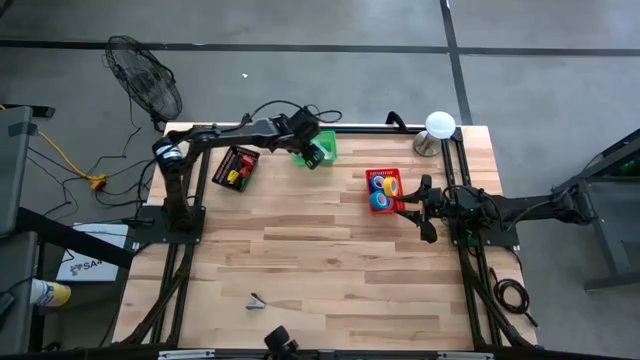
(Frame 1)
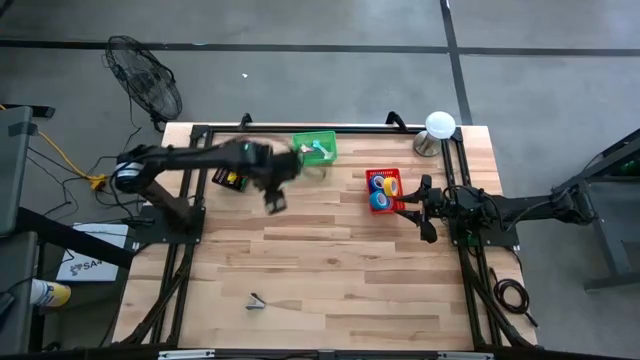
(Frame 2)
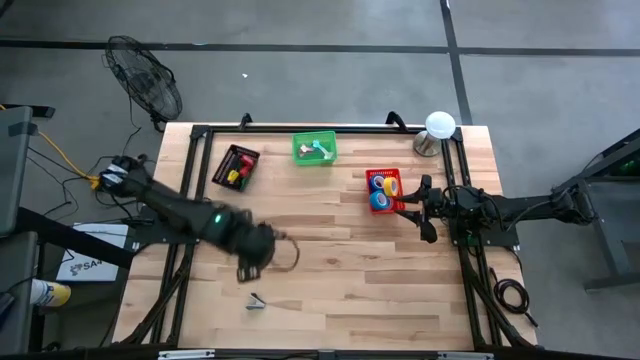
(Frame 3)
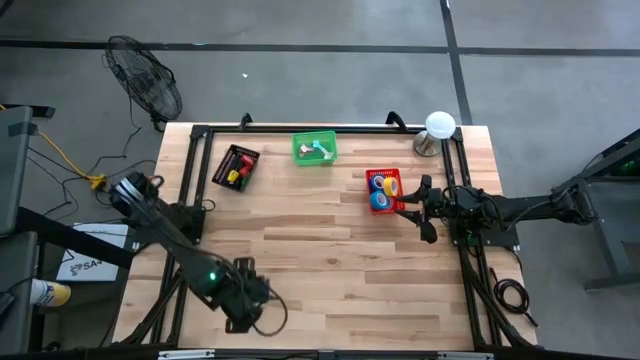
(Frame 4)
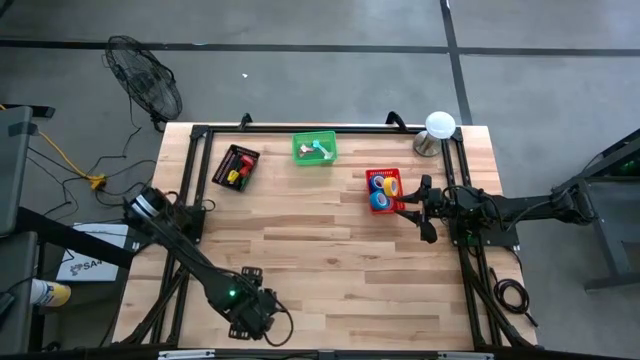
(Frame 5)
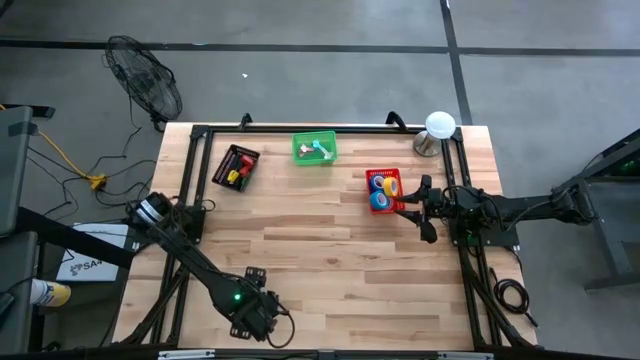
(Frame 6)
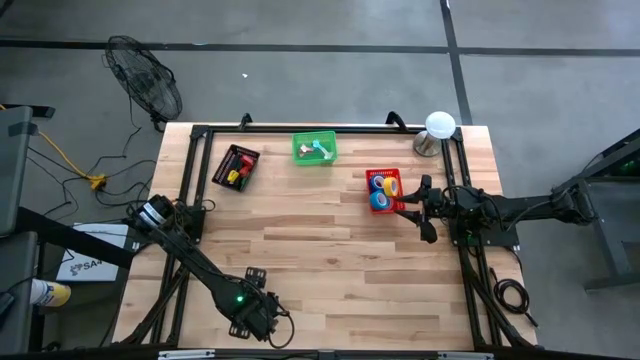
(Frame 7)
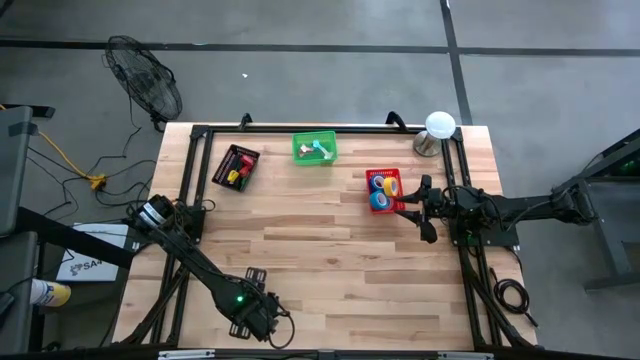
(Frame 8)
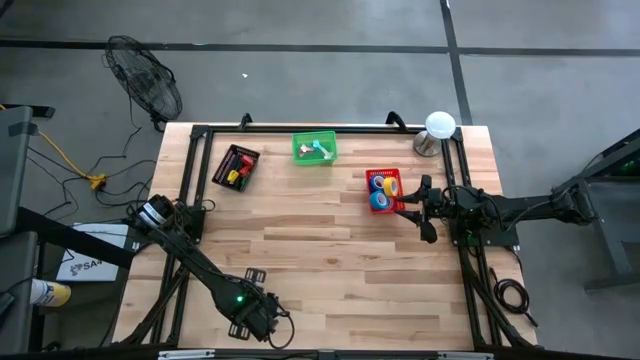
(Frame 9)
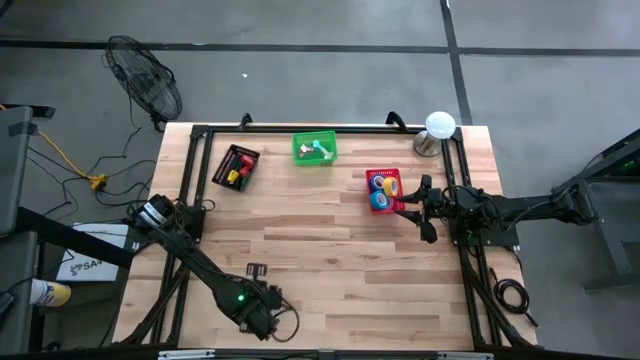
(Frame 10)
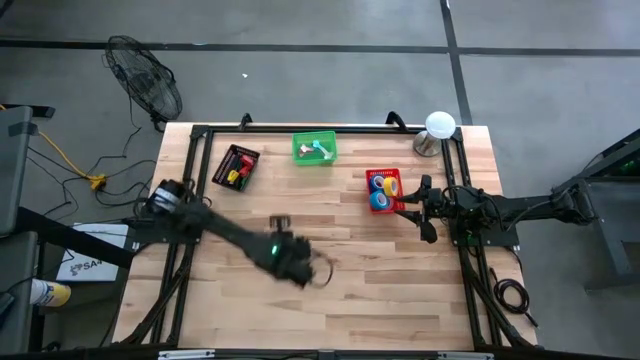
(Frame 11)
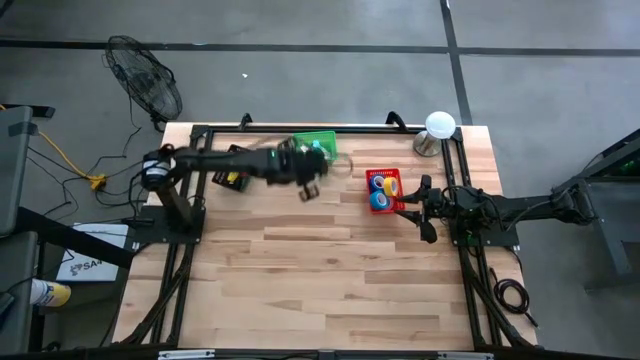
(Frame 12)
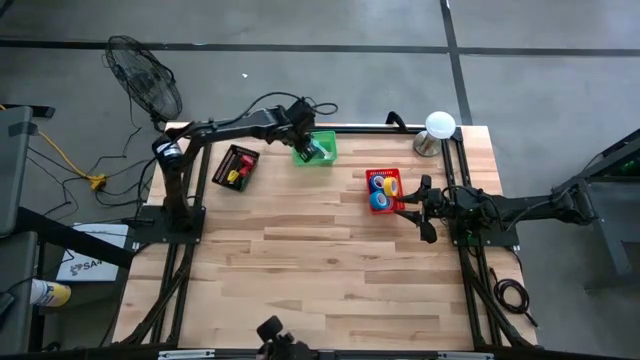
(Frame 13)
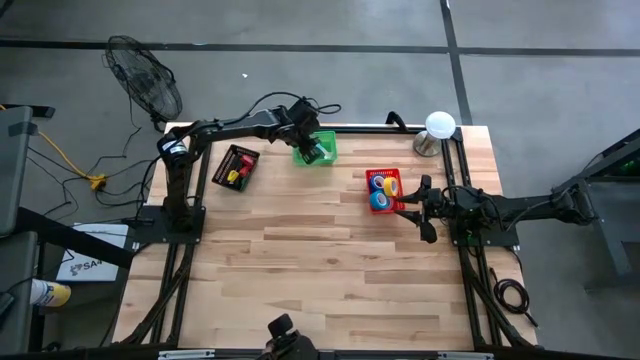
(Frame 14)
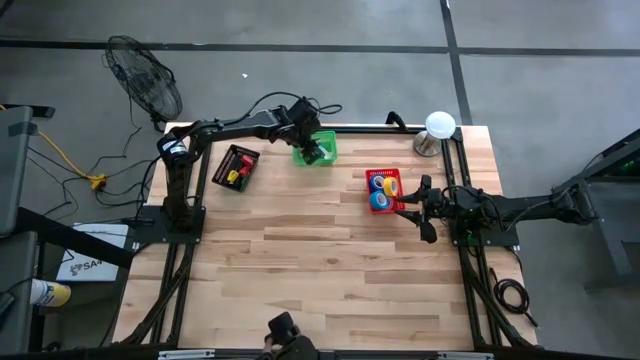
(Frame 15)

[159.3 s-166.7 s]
Task: Pick and place Stapler, Stapler remover, tape
Put the black staple remover into the green bin

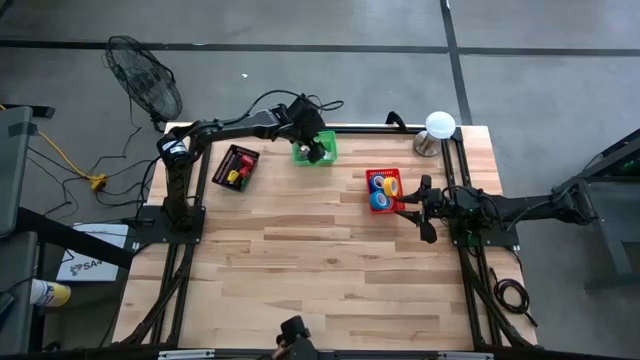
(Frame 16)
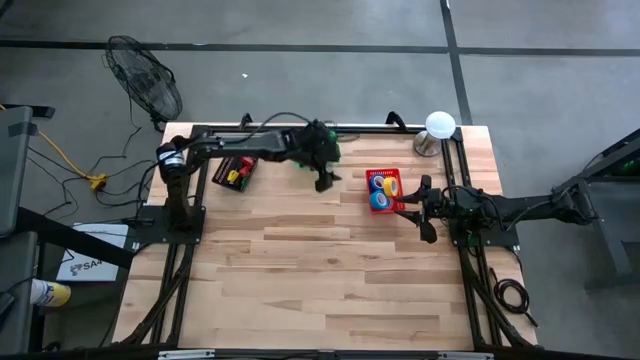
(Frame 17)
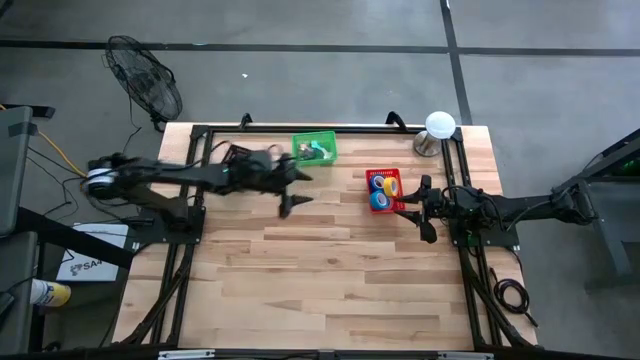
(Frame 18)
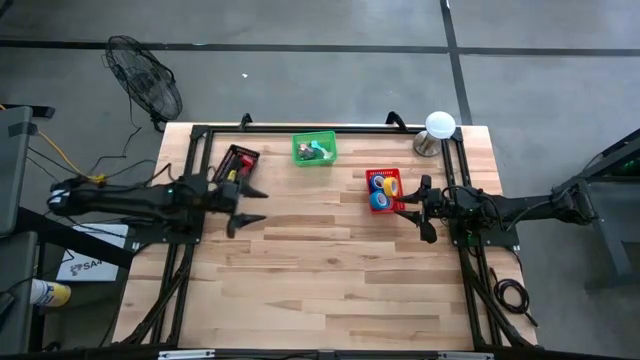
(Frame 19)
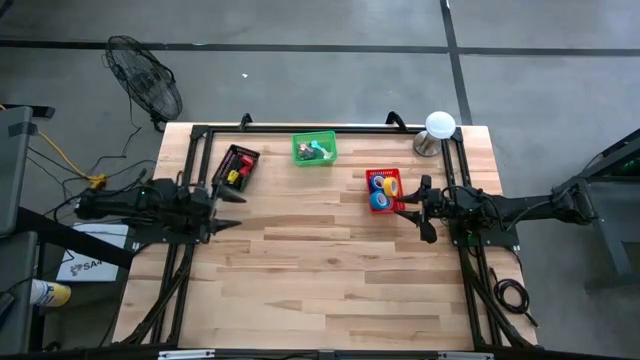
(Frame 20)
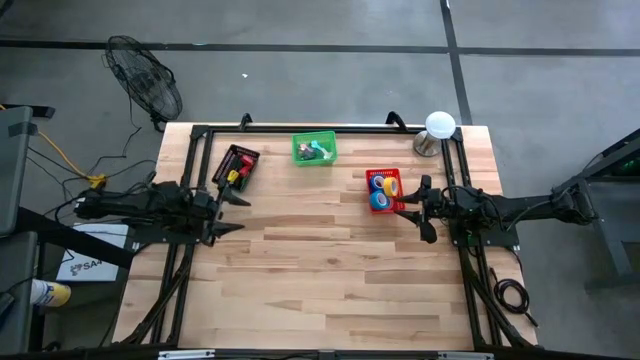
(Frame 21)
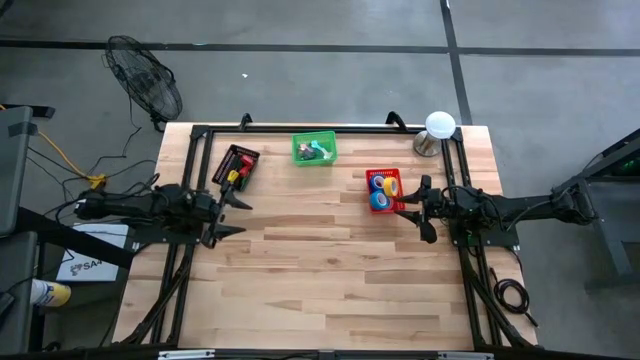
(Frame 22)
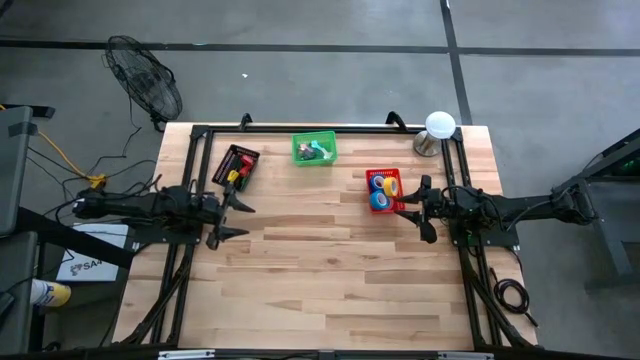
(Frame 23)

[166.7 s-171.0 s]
Return to Home Position

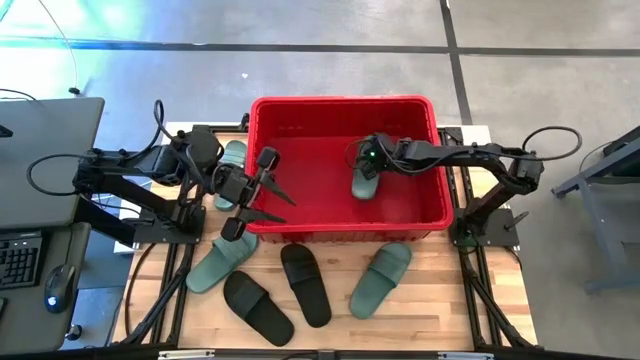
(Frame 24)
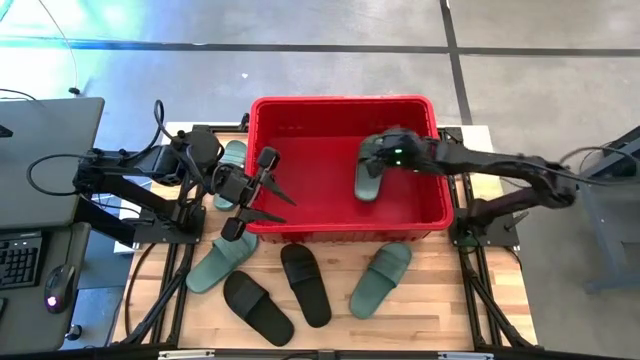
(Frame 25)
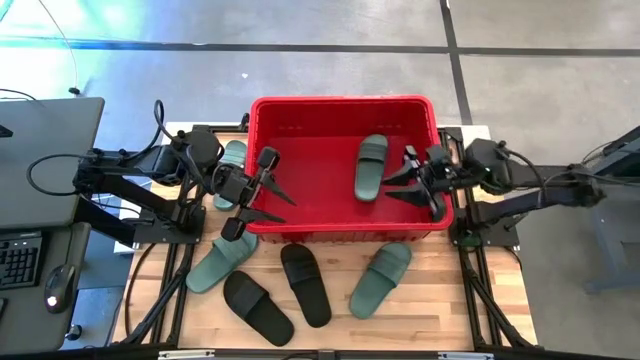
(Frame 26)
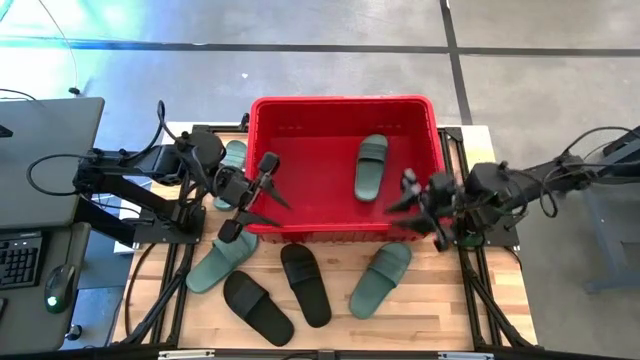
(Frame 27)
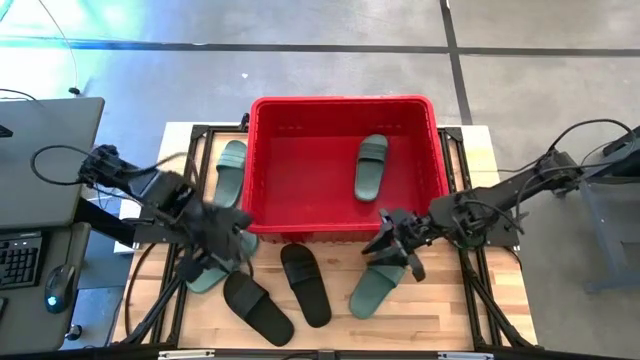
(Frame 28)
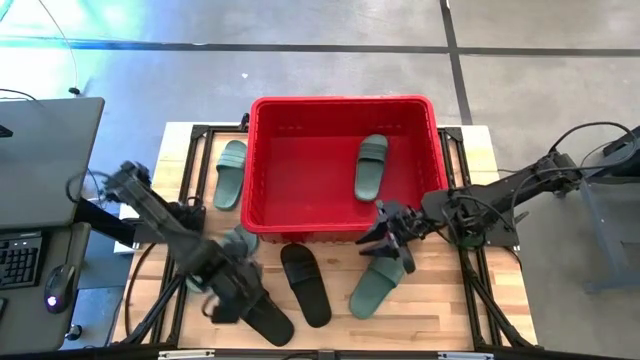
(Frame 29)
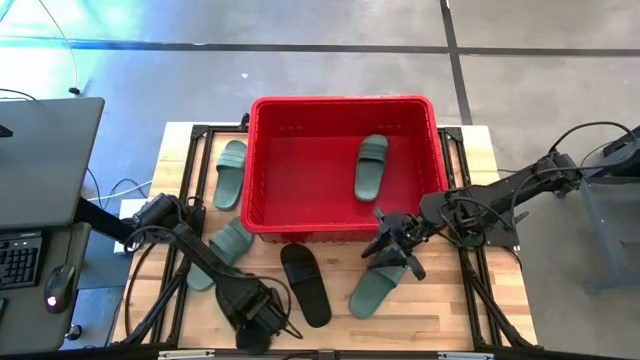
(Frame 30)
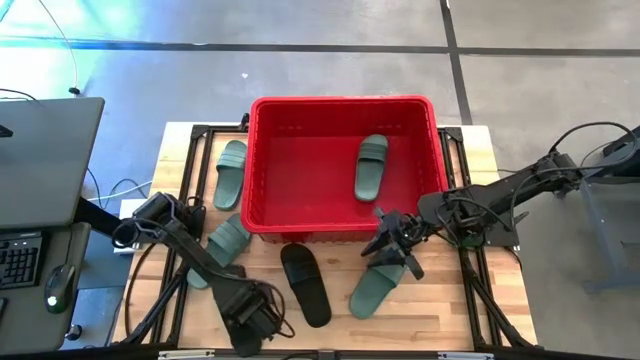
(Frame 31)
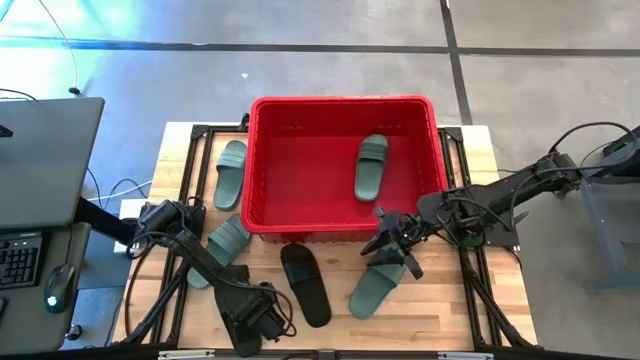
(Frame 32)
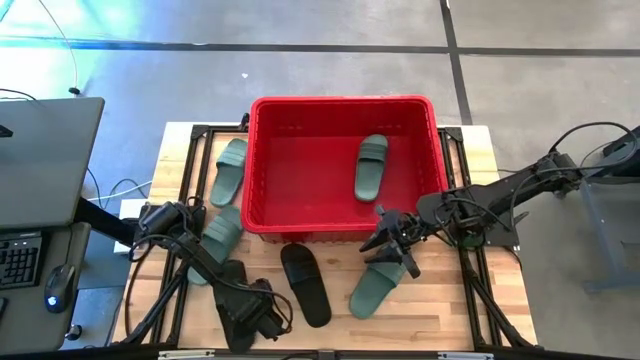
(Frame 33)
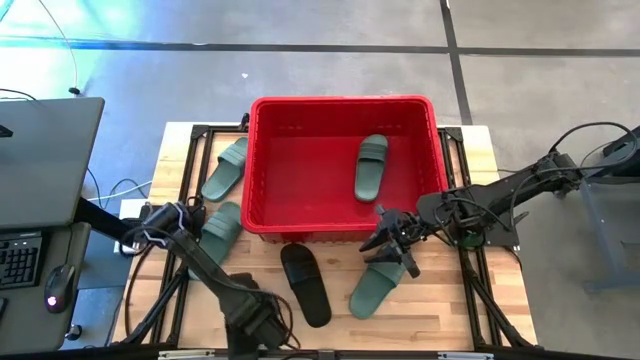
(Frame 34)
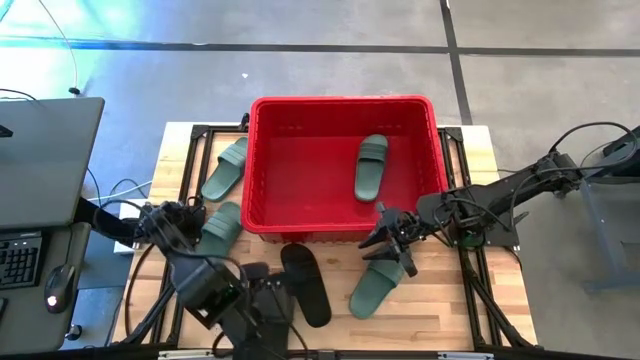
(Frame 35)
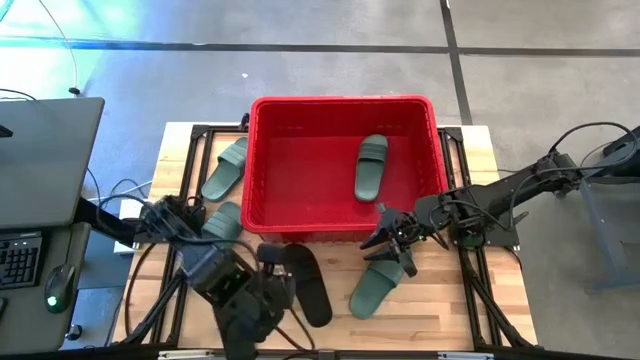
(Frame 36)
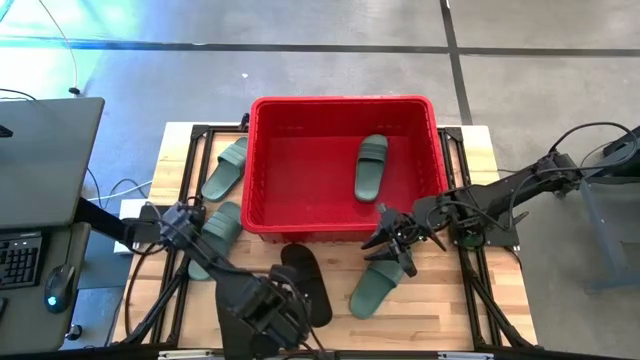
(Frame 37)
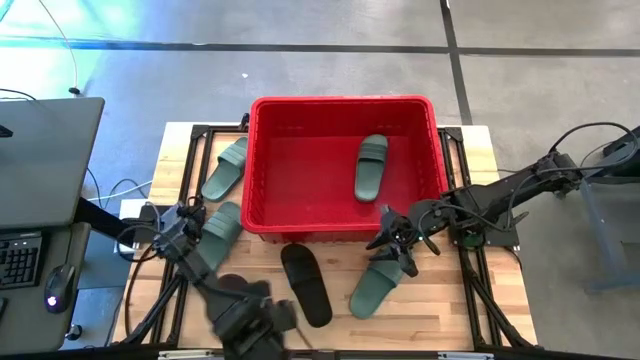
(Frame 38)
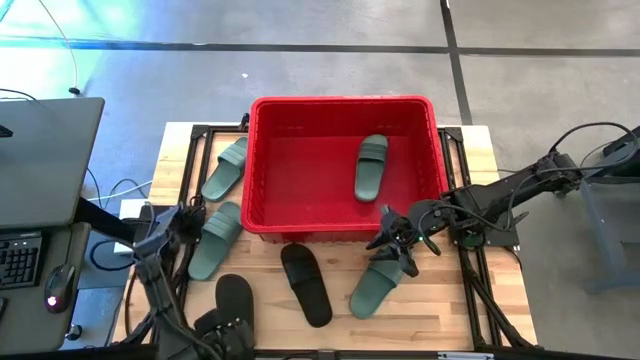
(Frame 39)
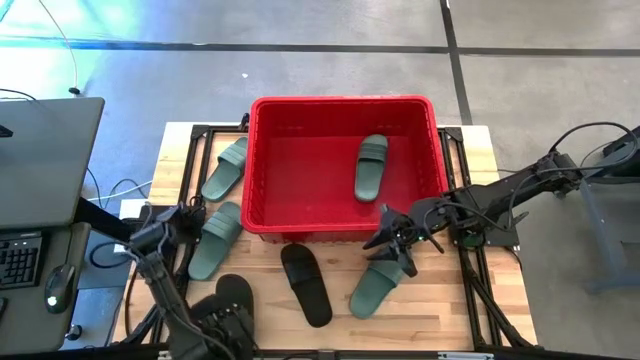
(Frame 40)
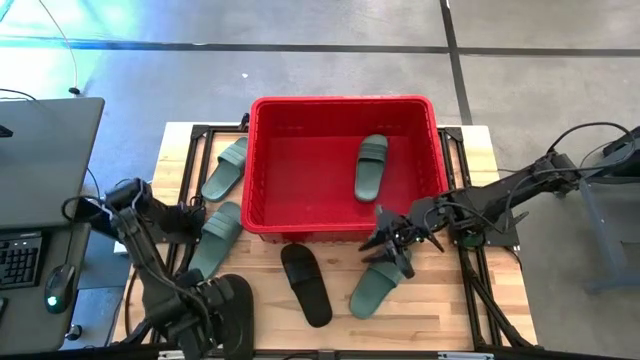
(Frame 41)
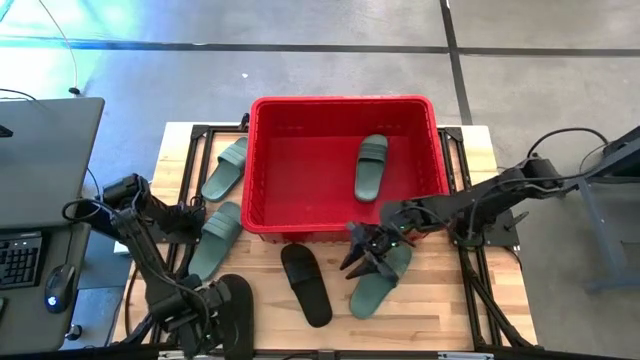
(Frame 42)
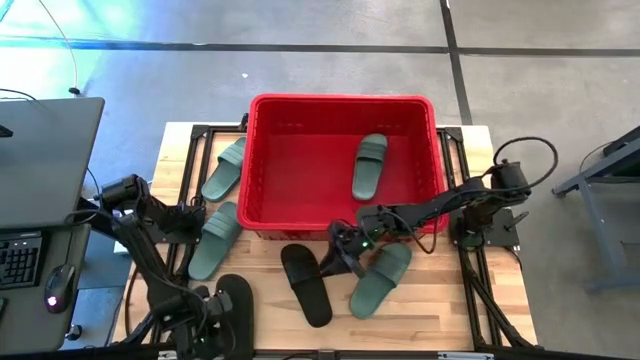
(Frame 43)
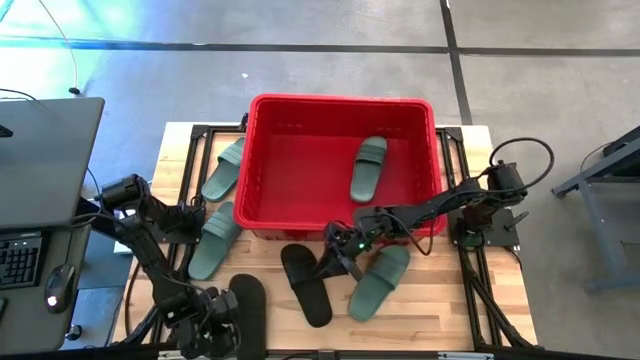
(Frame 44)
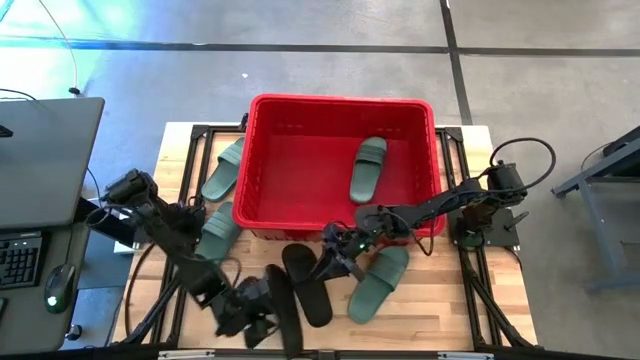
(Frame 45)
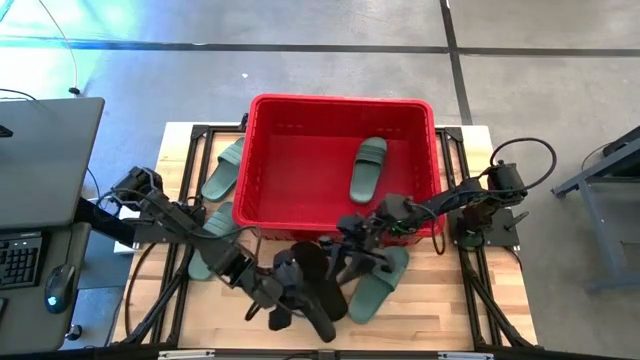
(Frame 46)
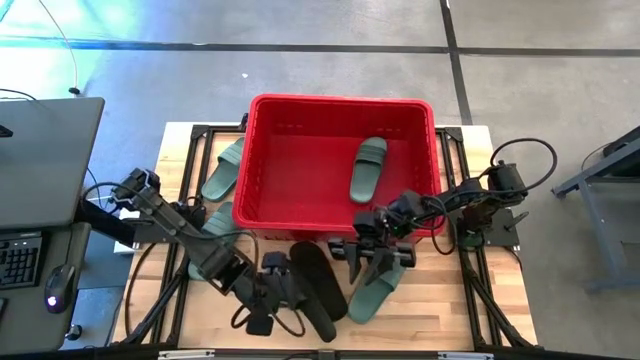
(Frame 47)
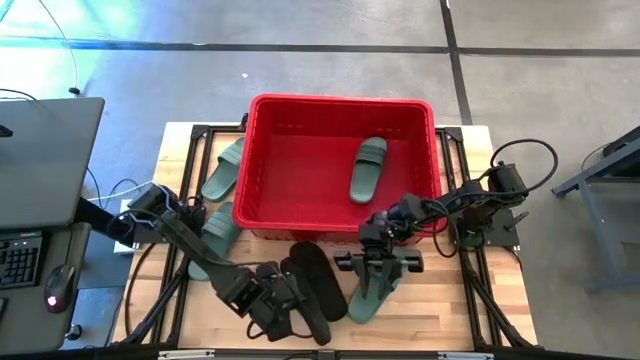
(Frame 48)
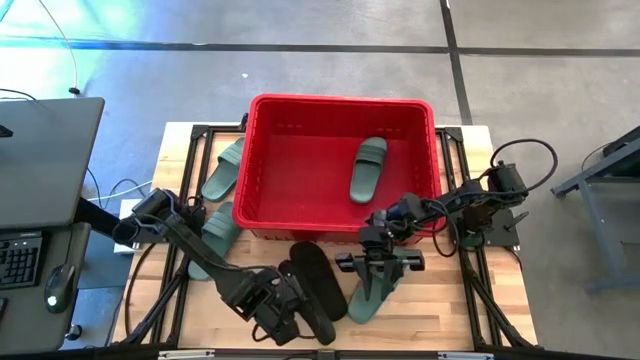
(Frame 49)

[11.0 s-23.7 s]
Task: Pick and place slides into bin
Put the black slide into the red bin
